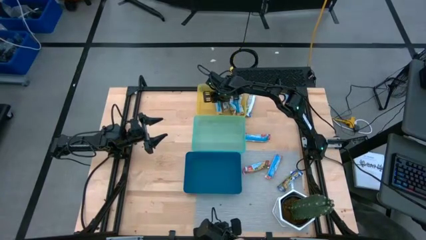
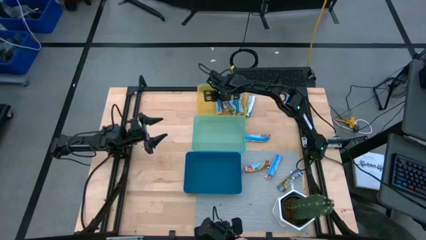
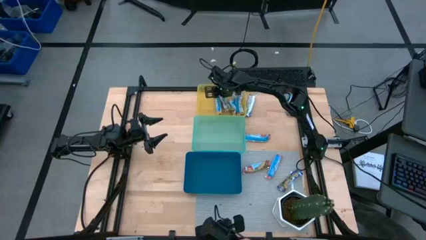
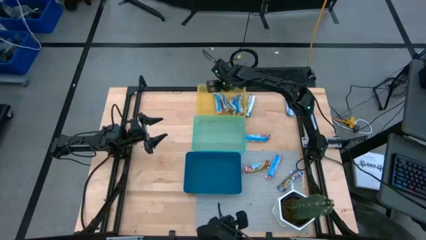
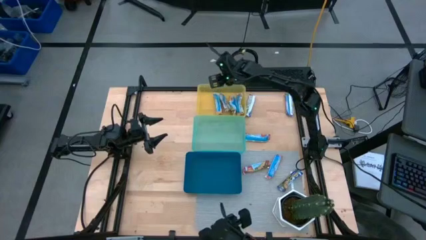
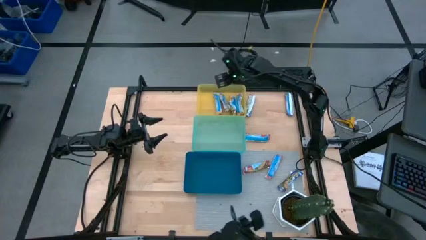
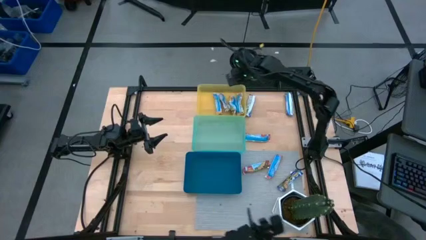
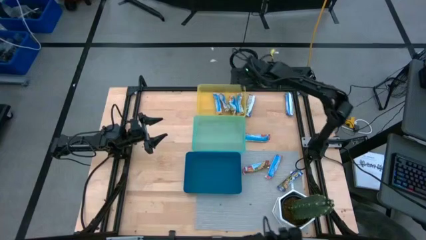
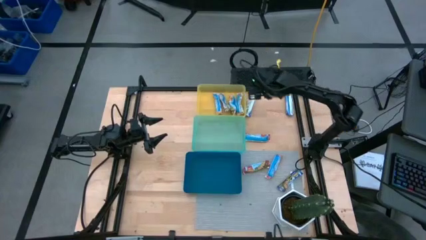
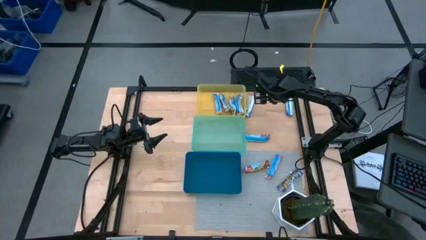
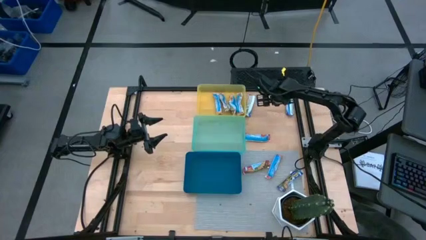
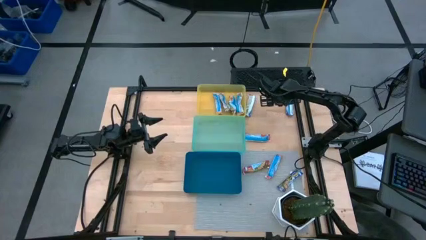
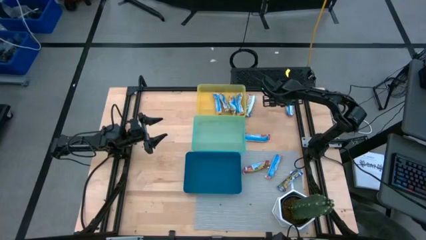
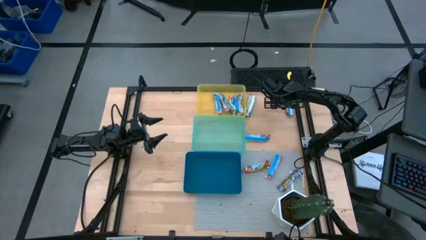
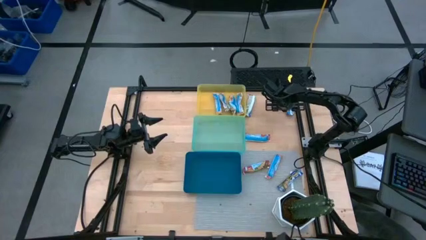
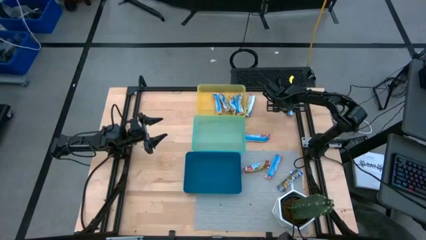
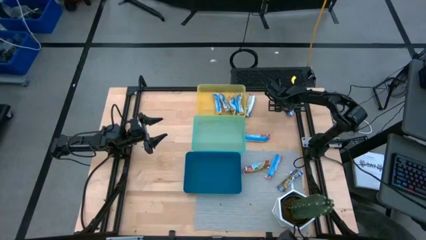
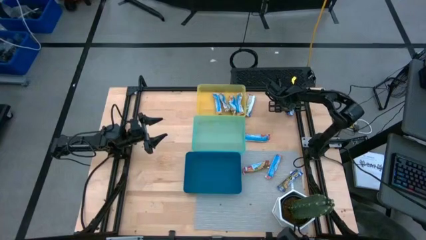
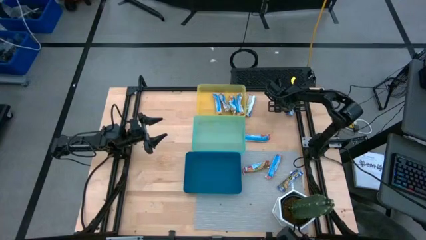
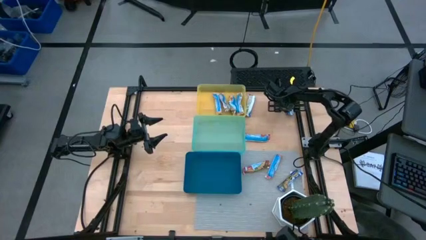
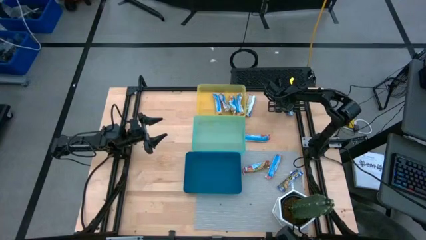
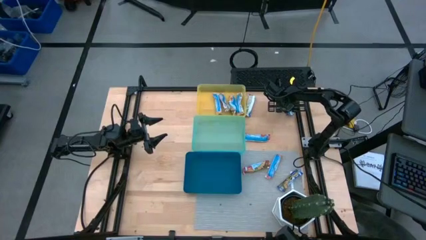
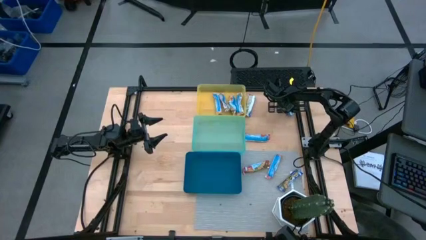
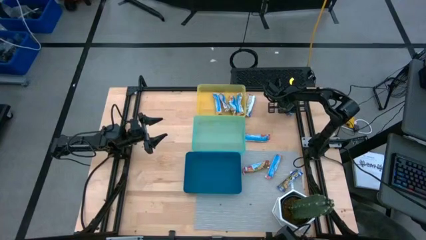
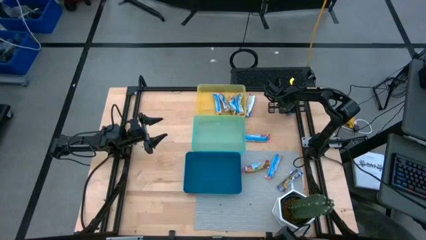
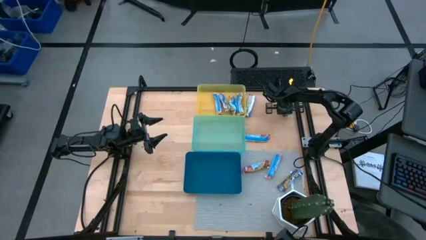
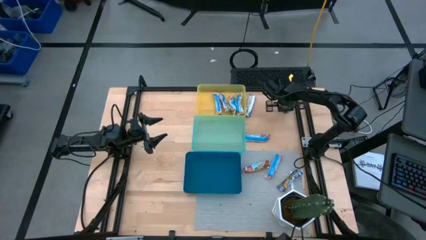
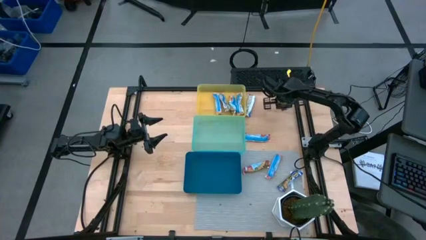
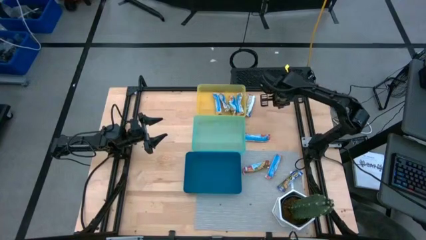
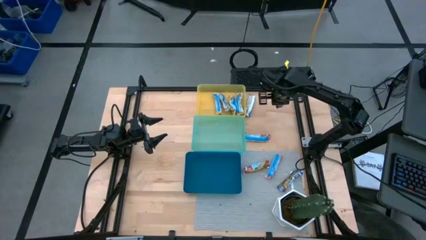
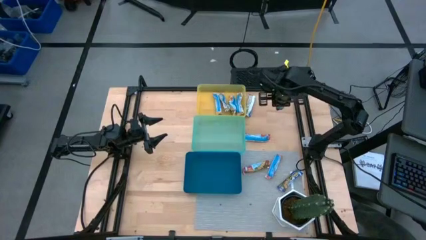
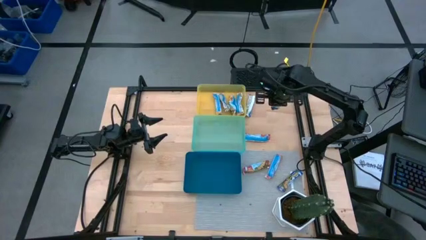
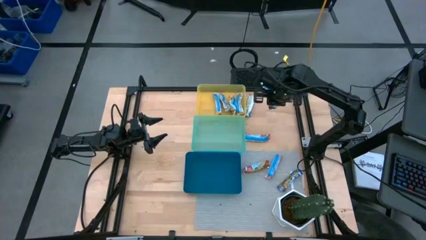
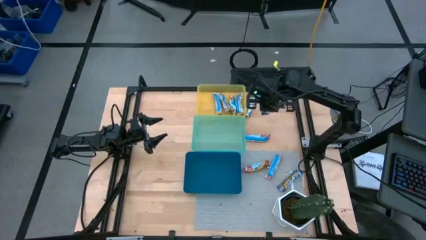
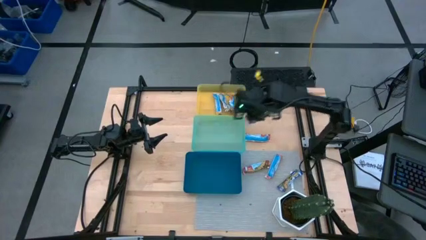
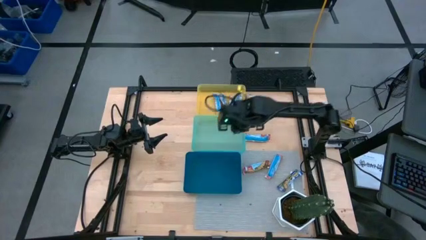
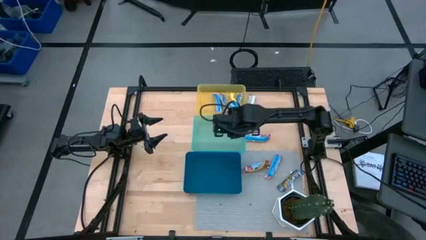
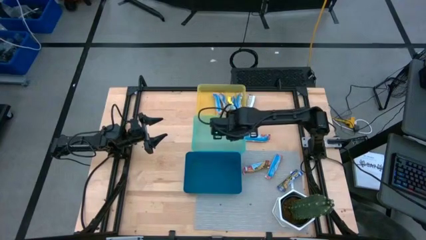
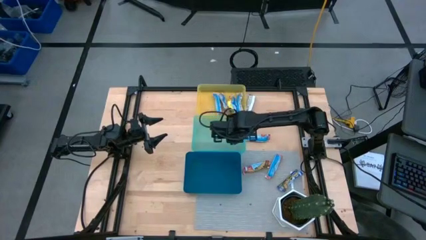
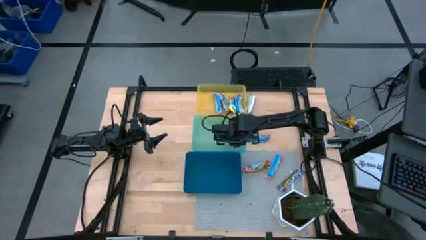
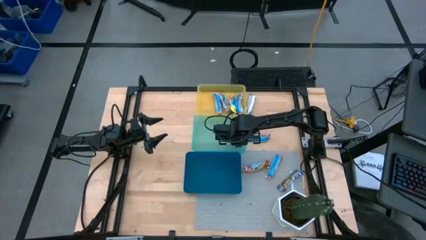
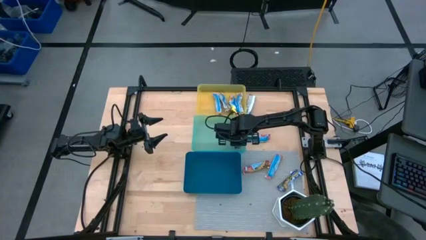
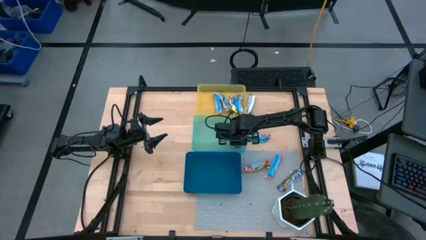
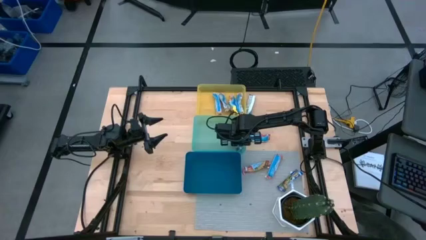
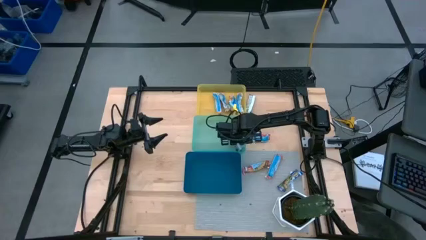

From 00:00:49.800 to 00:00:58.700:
Task: Pick and place Granola Bars by type
Put the blue granola bar into the green bin

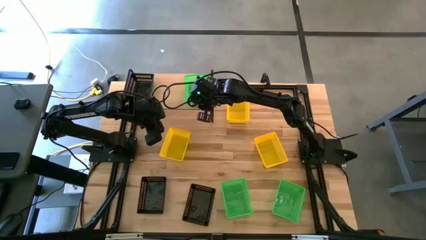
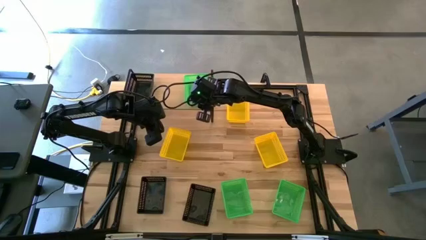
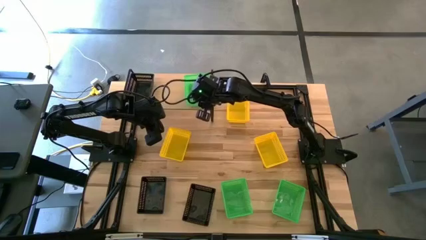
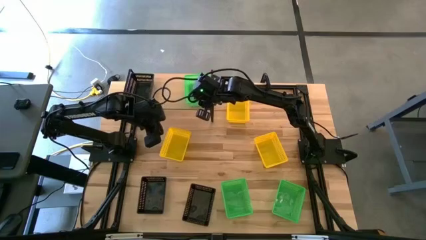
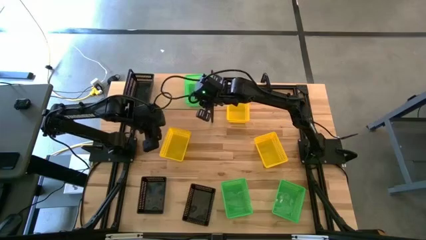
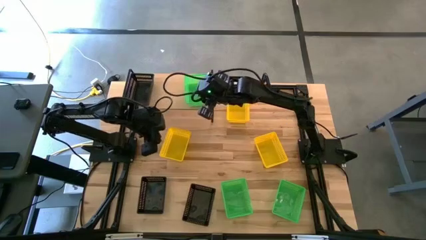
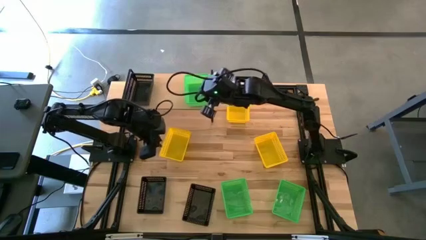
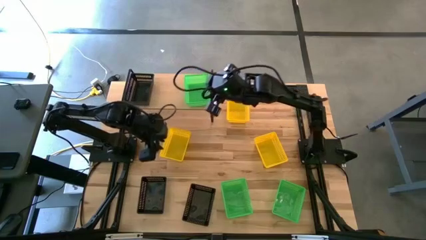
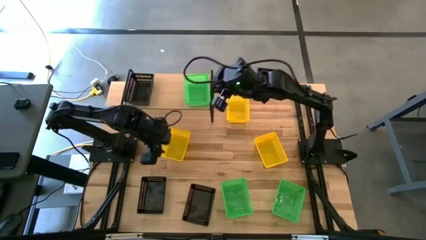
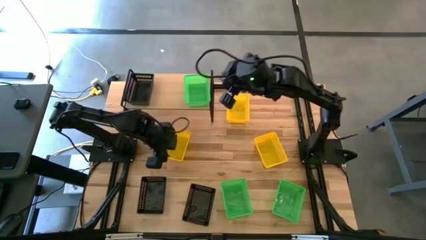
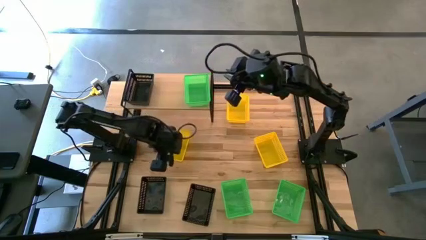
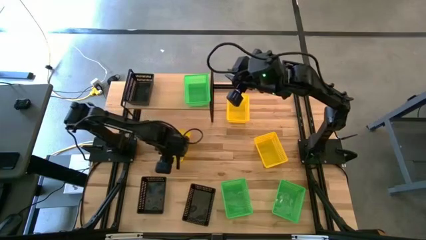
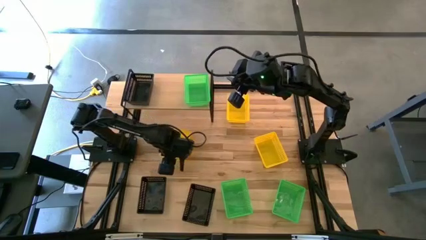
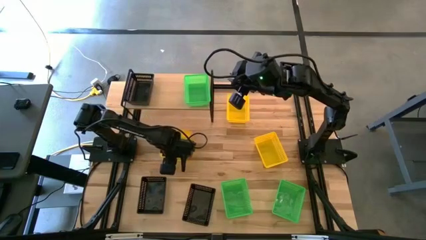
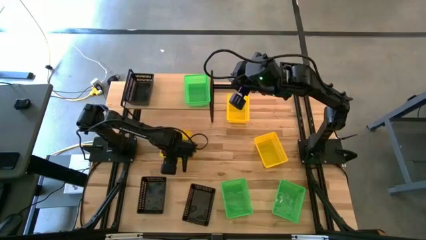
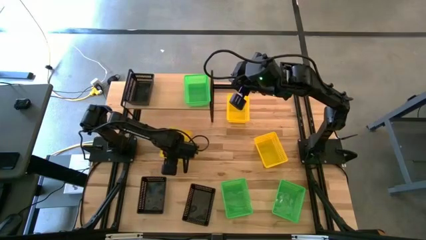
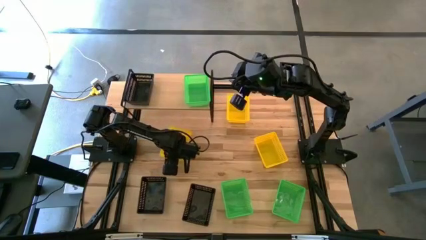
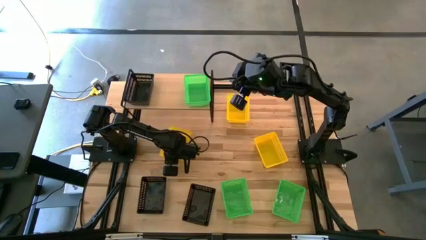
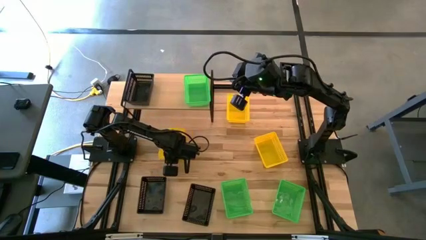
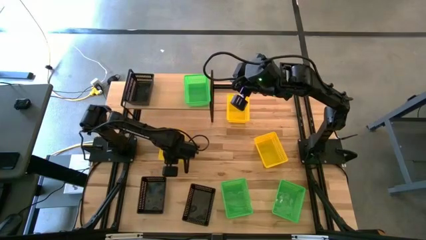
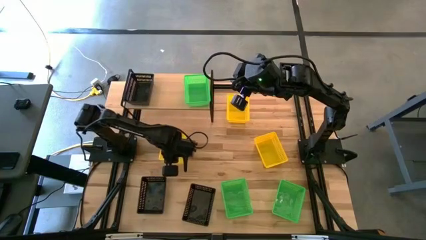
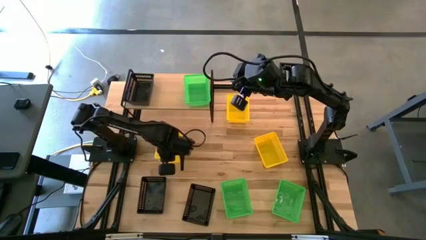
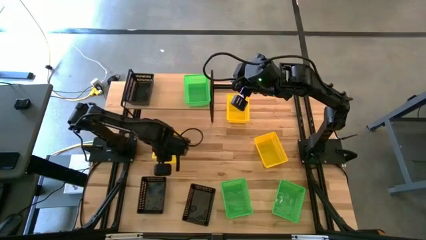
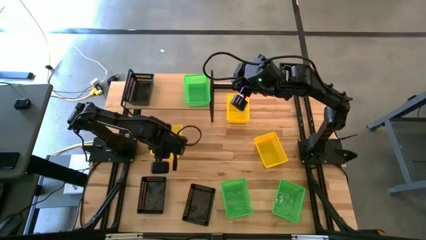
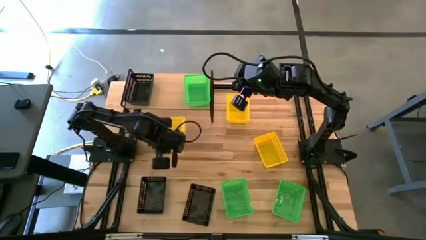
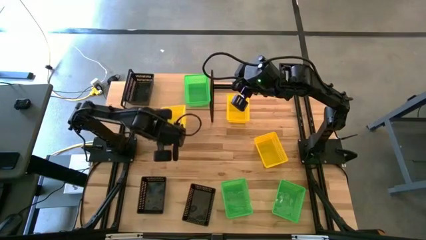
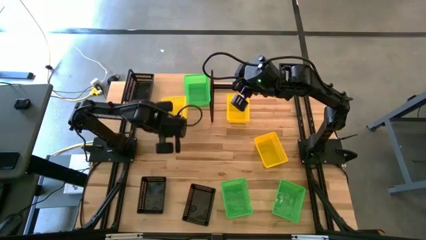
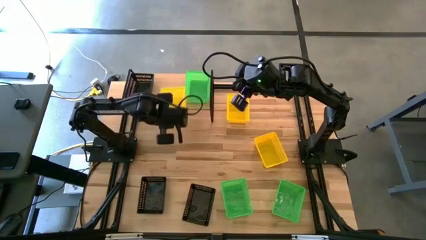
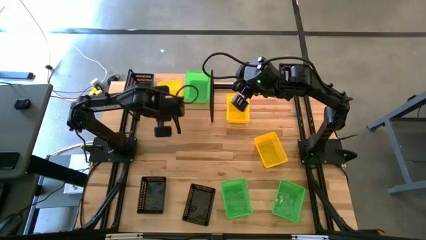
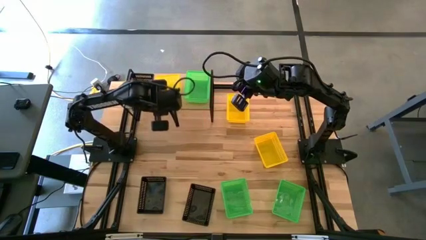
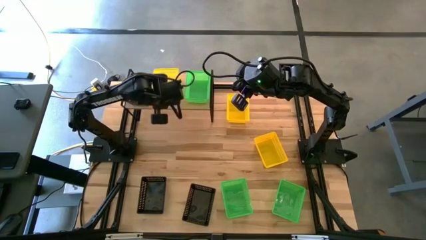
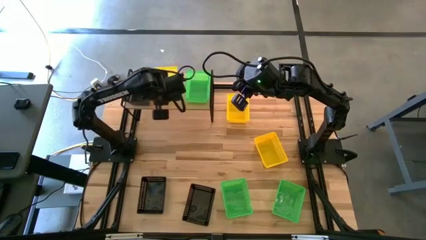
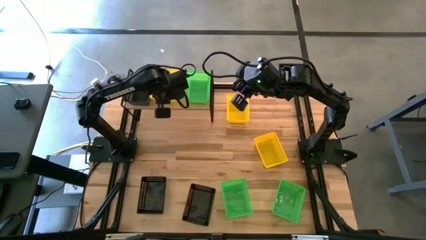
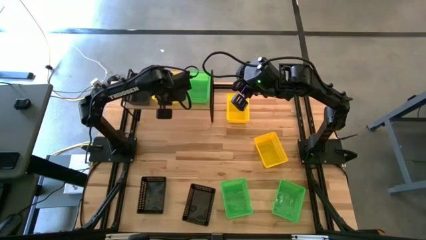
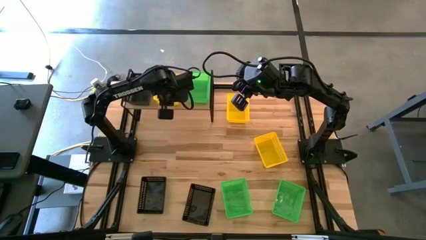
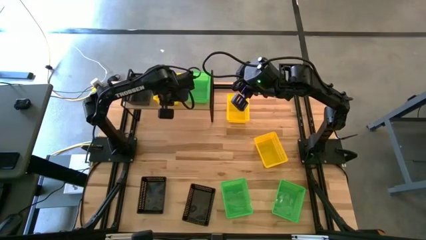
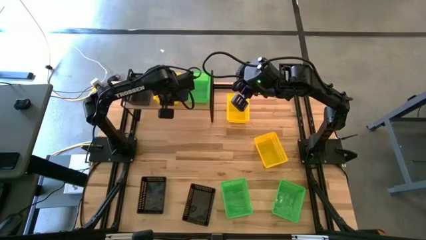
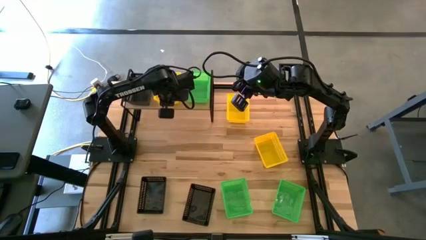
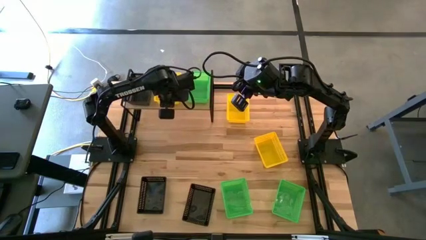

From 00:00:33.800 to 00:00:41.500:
Task: Stack baskets on shelf by color
Put the bottom left yellow bin on the shelf
